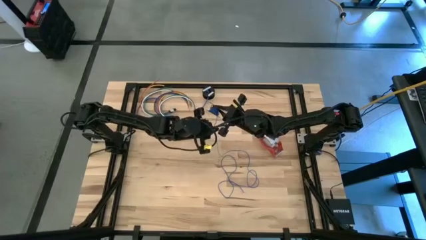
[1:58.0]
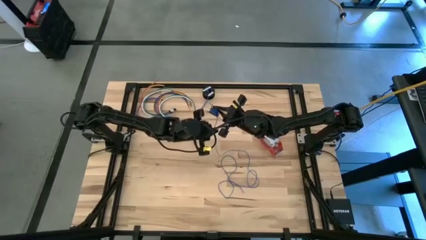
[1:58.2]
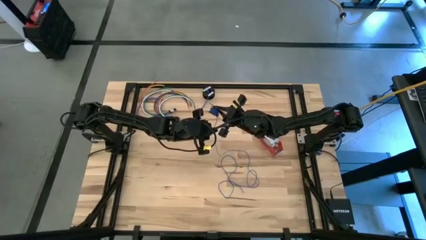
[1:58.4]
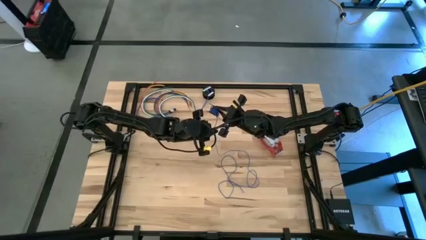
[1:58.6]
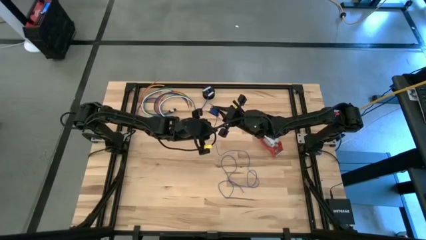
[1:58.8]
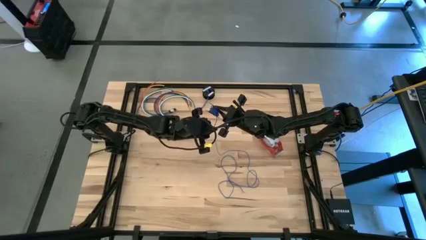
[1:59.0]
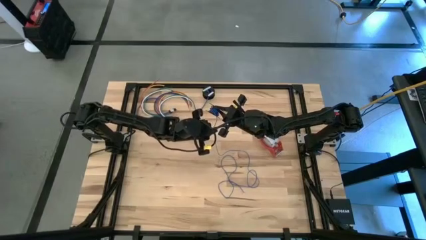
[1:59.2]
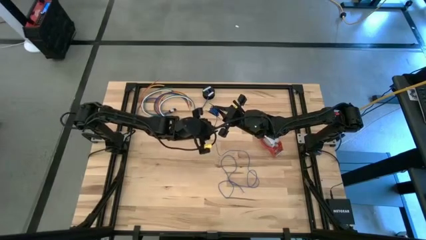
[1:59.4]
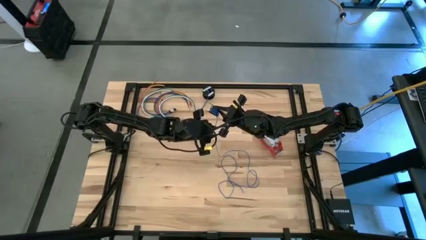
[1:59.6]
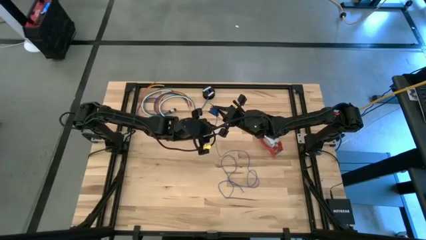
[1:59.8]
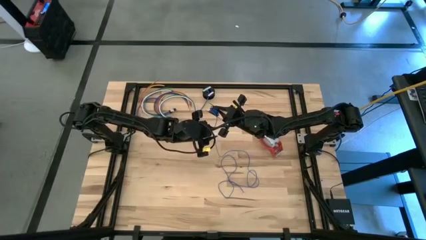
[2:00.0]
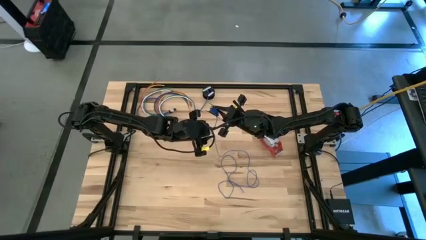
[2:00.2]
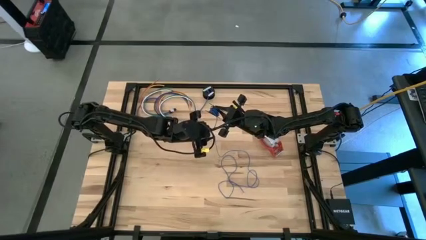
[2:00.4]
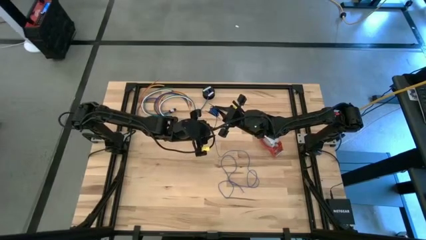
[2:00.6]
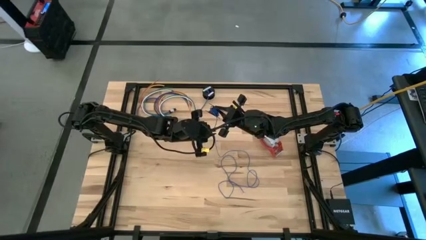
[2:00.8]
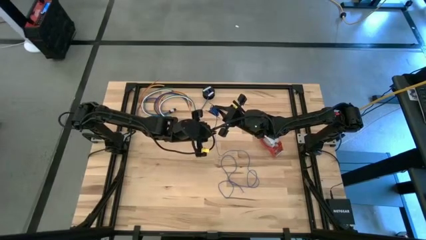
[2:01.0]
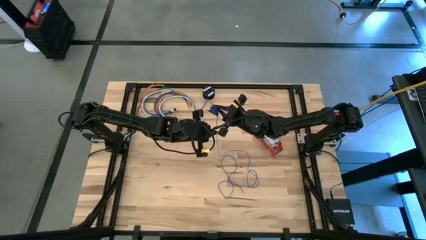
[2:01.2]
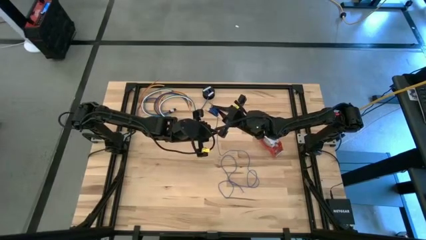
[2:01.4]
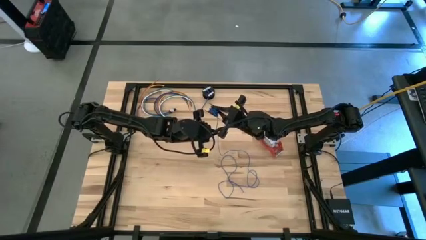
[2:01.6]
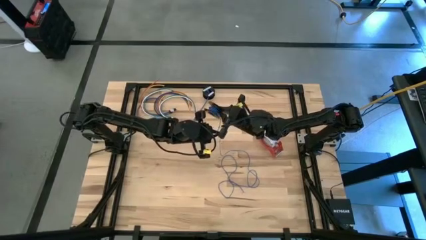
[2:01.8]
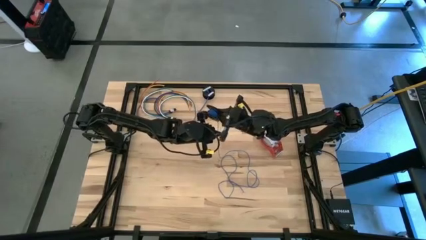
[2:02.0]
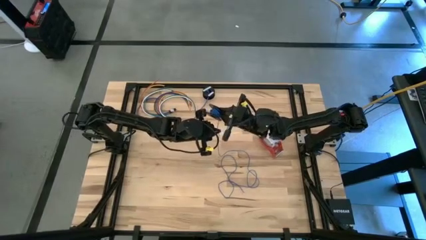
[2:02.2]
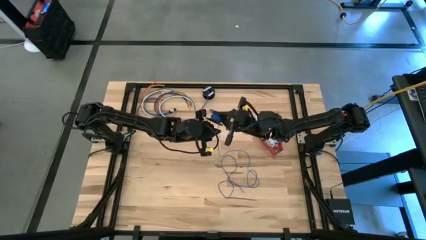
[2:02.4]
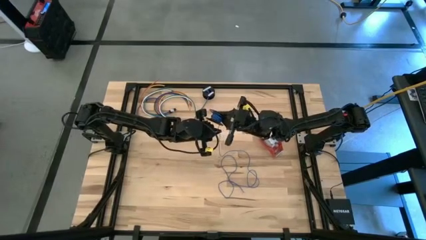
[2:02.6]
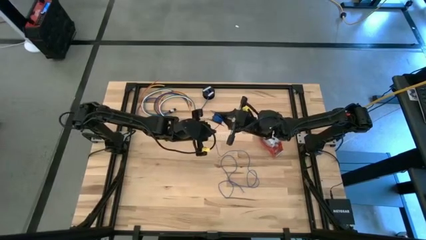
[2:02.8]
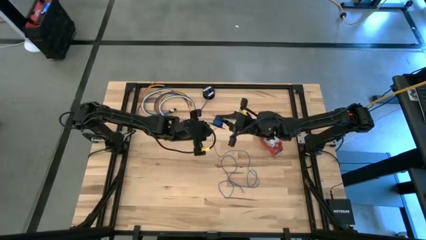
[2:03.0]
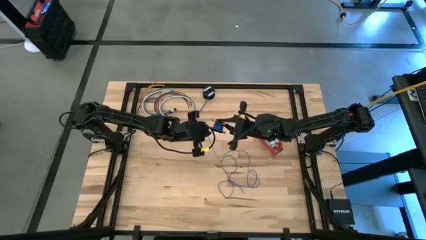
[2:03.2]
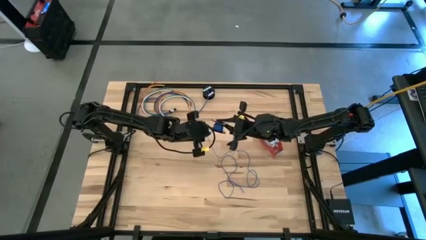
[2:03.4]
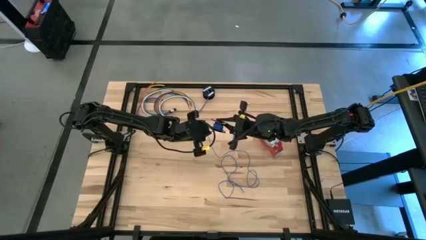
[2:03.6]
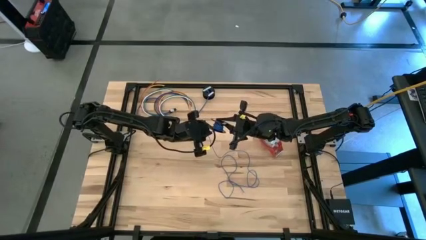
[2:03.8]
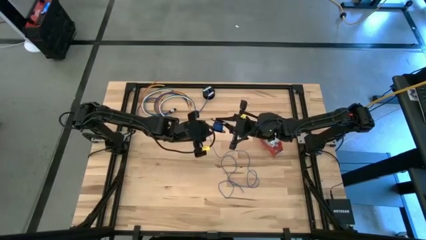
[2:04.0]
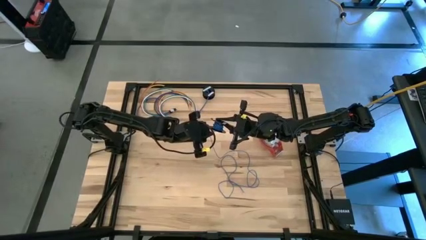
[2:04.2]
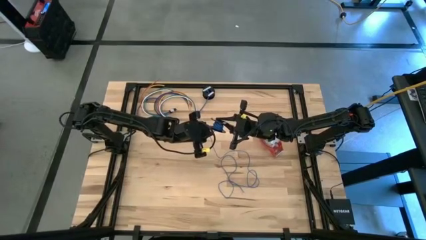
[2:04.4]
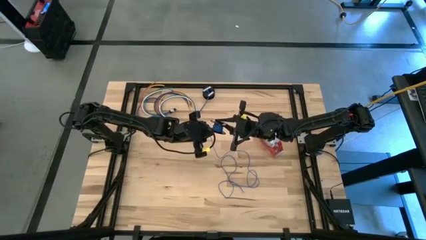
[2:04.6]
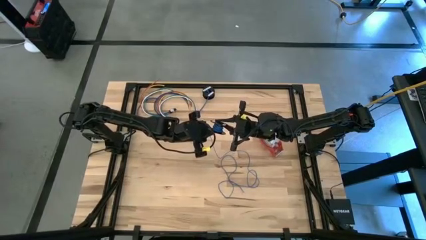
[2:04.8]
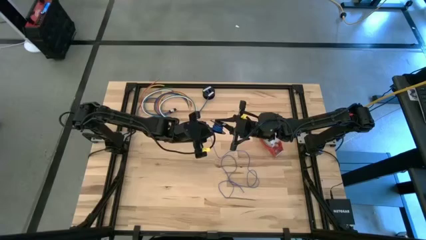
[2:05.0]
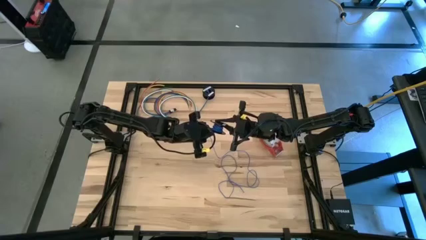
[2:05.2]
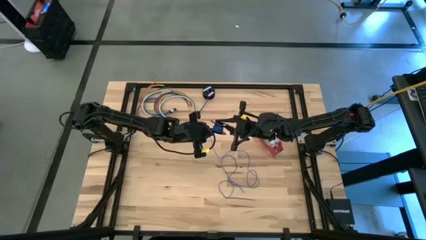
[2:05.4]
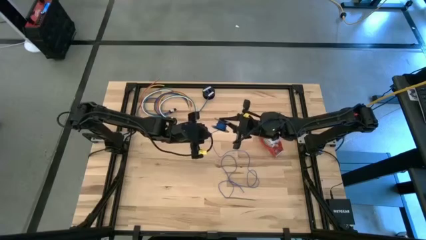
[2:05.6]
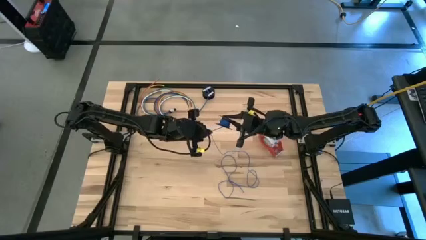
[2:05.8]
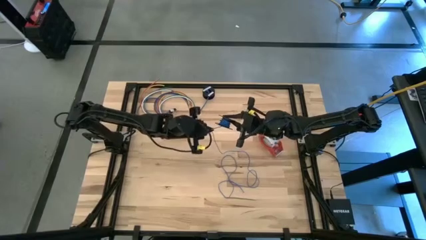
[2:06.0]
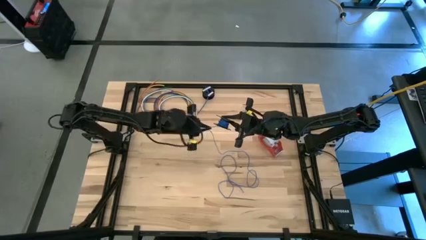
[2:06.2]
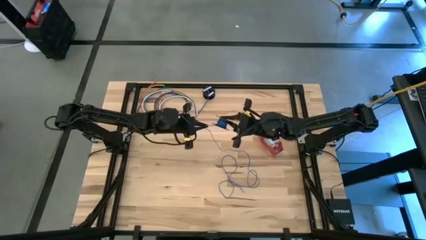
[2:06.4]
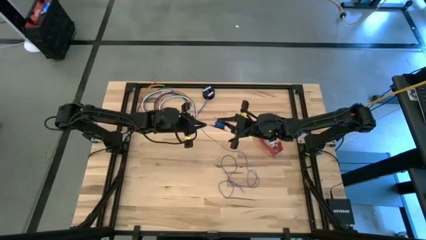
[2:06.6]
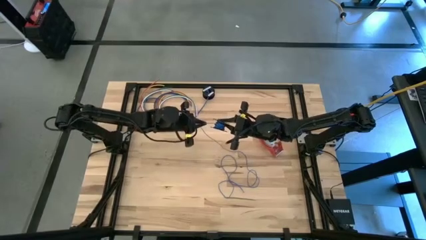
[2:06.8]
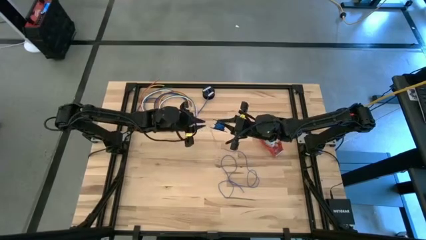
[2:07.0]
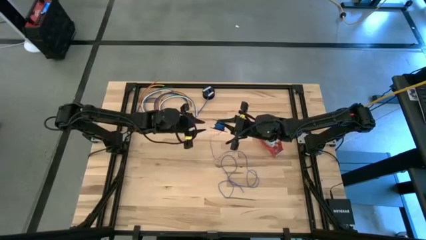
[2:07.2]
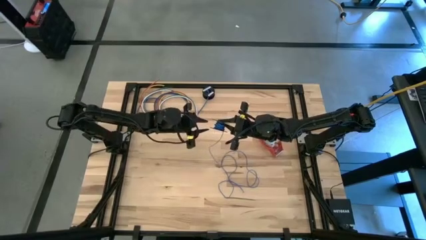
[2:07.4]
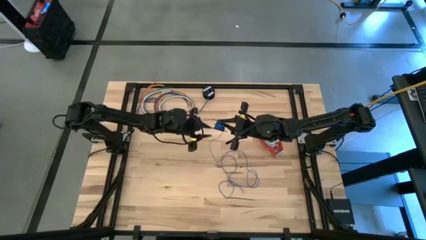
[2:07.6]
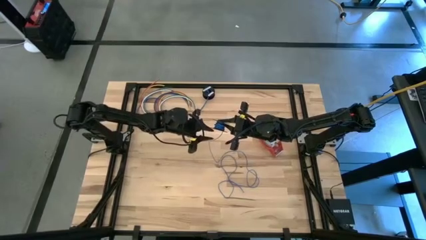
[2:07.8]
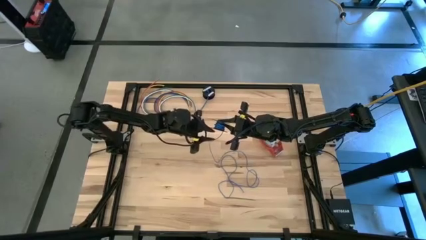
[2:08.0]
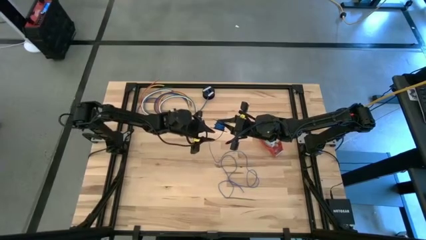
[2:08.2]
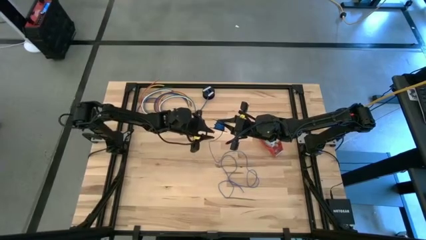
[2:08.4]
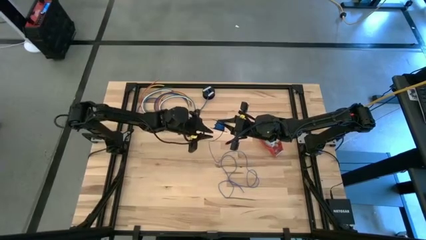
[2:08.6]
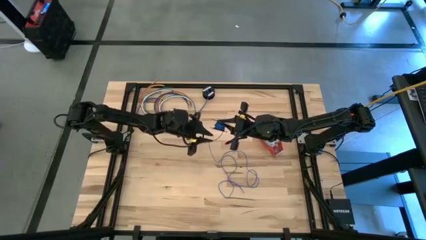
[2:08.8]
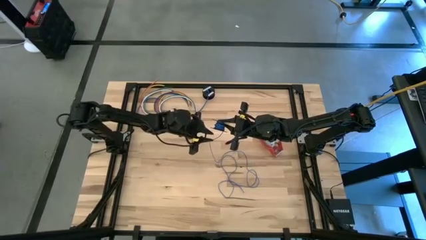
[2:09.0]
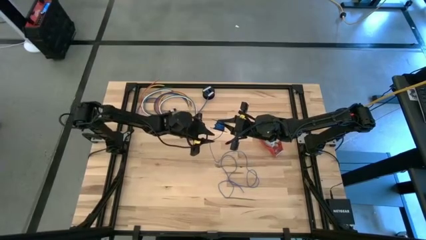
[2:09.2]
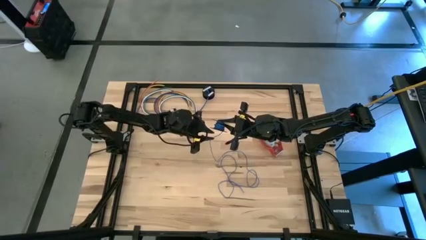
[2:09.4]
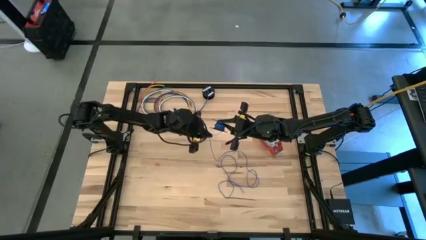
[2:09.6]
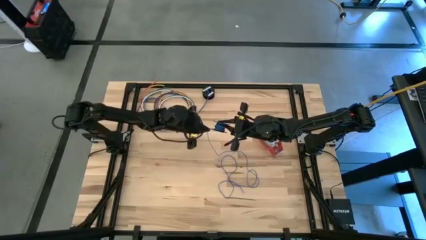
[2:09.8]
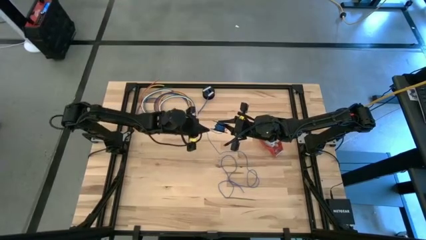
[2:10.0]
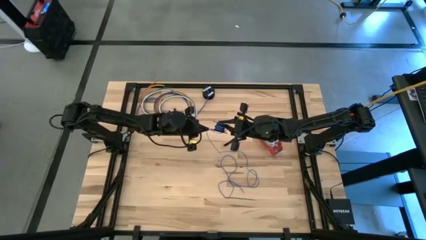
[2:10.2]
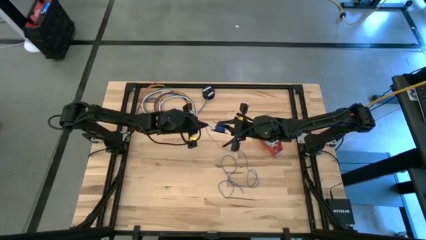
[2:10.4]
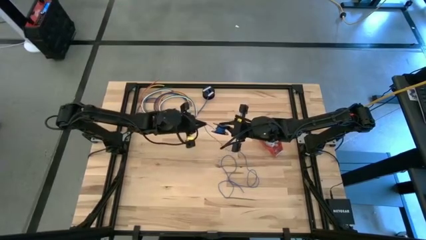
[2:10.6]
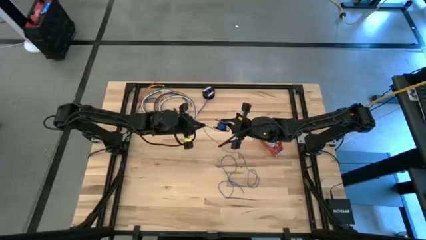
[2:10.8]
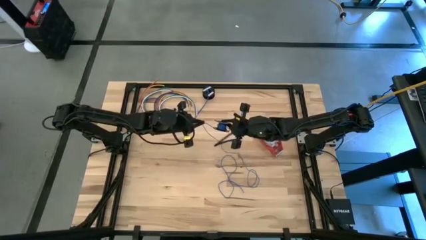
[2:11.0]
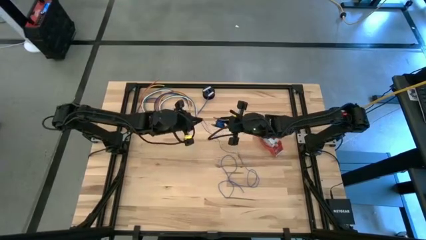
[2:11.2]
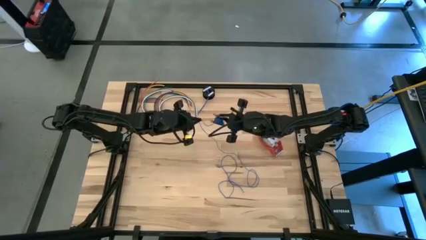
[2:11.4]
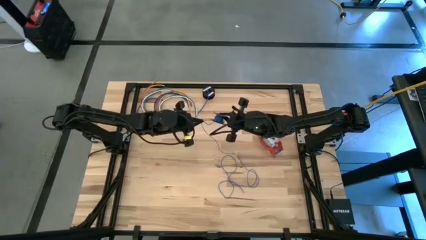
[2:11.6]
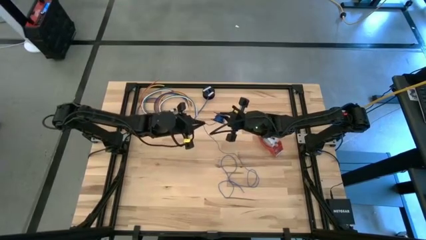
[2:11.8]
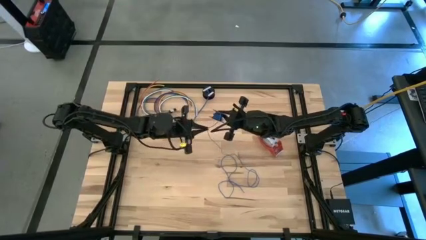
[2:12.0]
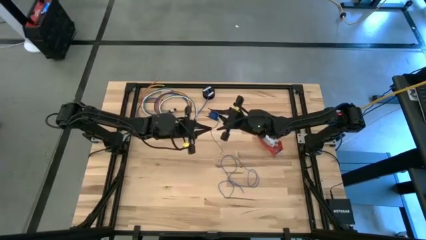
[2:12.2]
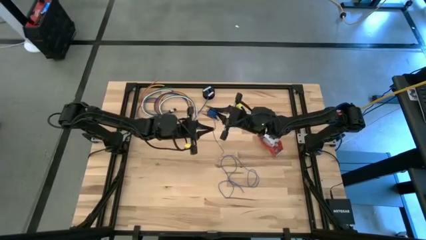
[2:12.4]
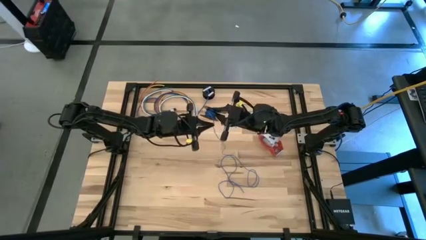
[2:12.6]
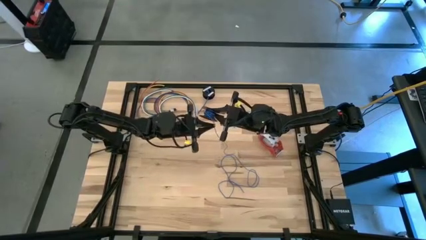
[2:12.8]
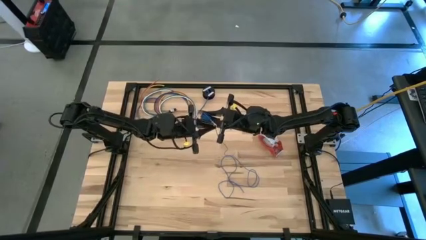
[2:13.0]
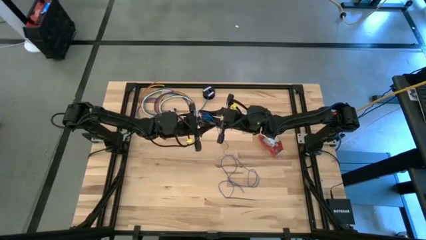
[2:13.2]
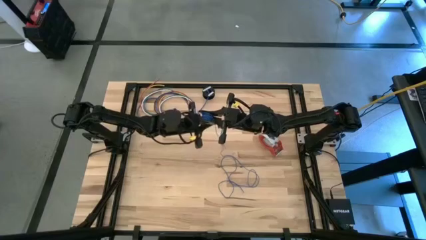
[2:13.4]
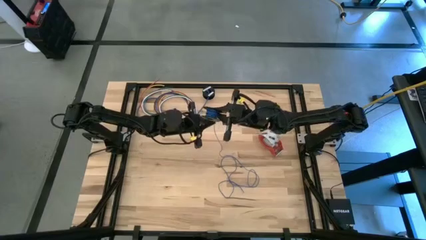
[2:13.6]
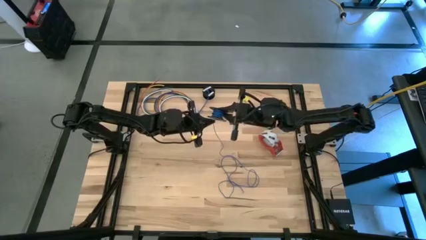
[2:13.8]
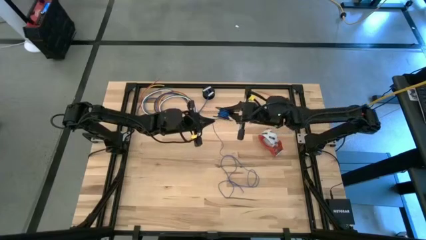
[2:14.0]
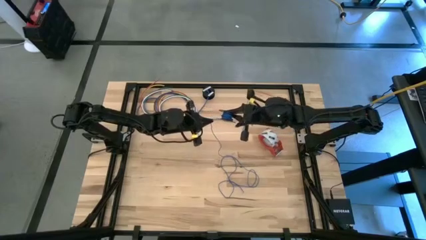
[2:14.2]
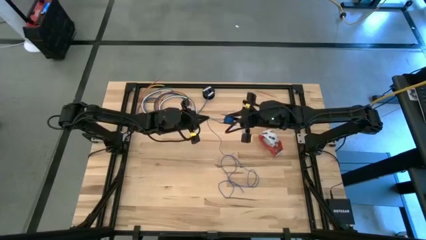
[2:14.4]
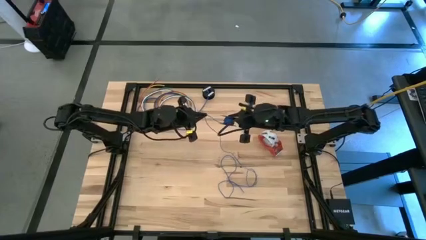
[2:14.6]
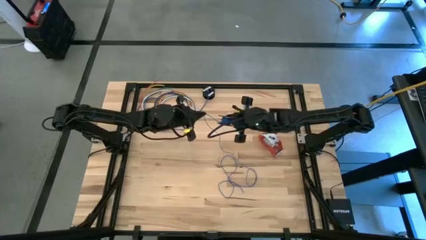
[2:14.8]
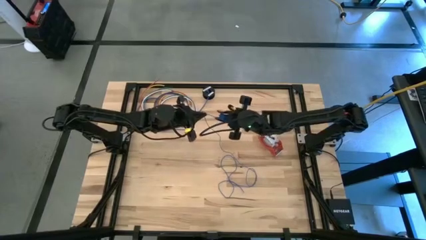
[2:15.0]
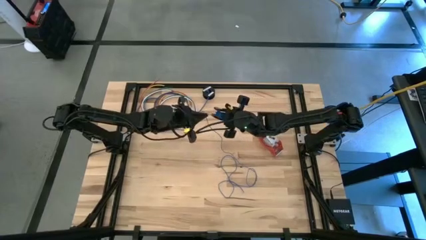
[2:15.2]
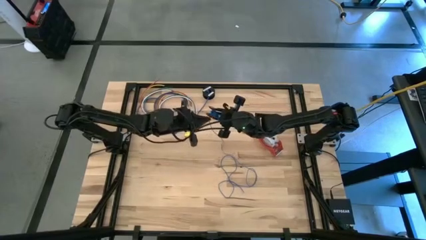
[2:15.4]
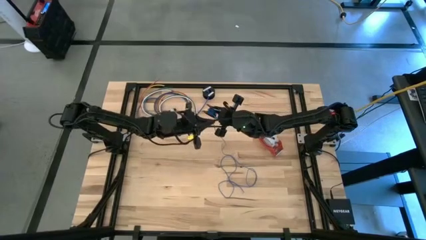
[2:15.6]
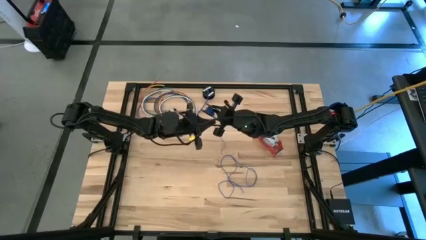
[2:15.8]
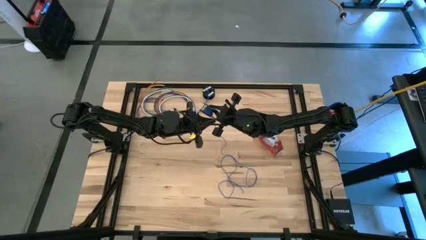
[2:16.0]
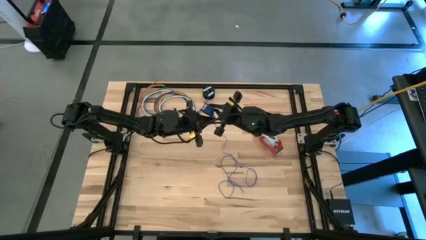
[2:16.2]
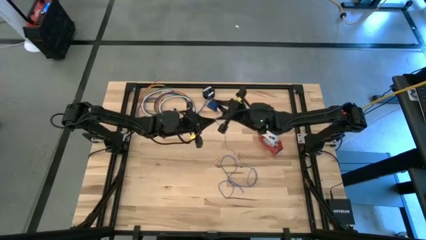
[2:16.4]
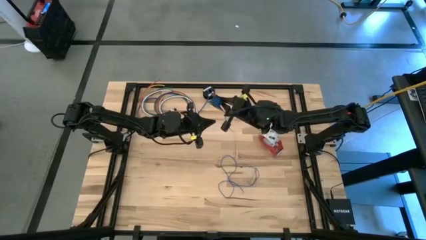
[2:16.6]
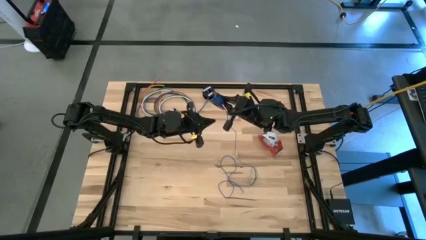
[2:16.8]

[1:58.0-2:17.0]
Task: Coil cords
Coil the blue wire onto the spool
